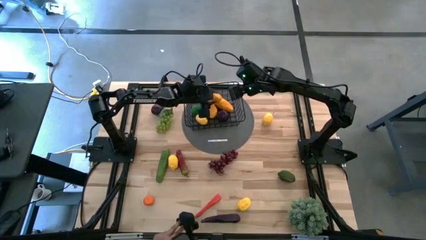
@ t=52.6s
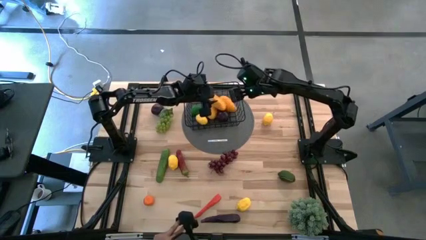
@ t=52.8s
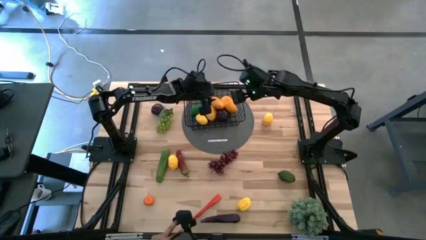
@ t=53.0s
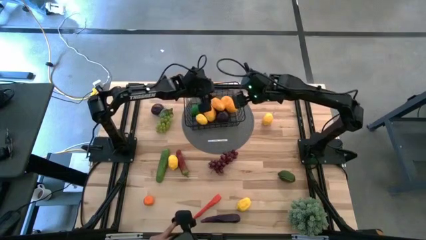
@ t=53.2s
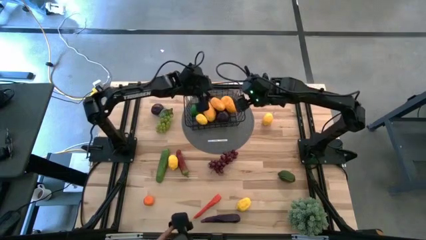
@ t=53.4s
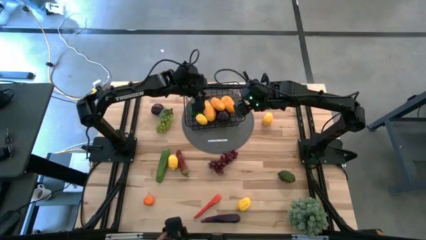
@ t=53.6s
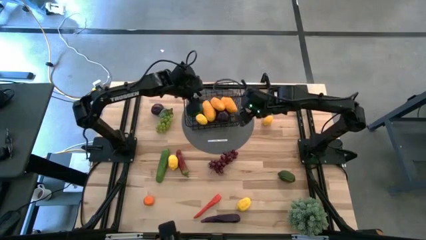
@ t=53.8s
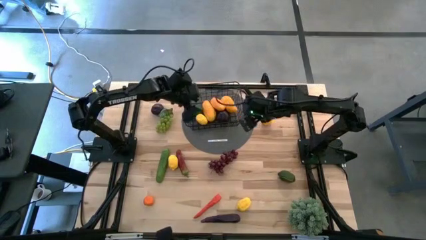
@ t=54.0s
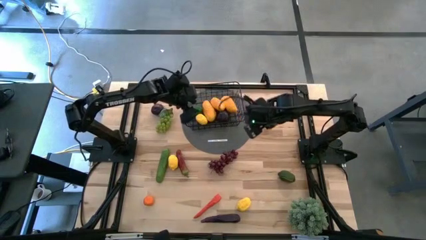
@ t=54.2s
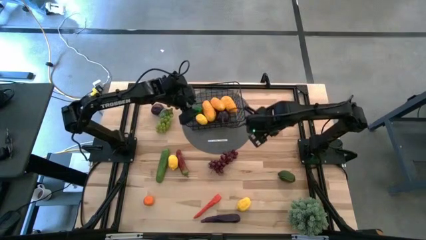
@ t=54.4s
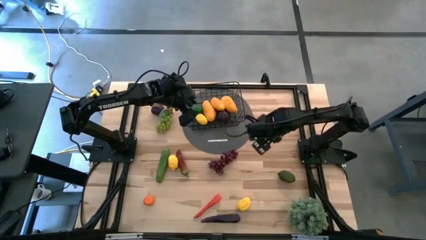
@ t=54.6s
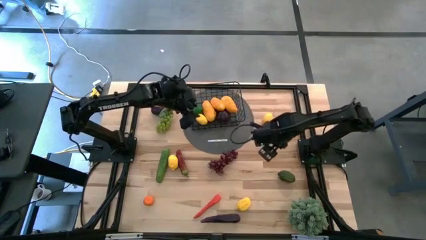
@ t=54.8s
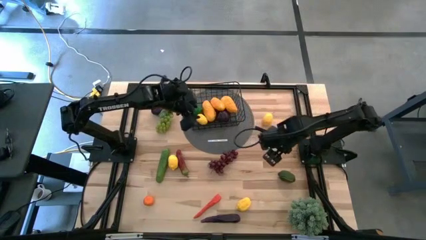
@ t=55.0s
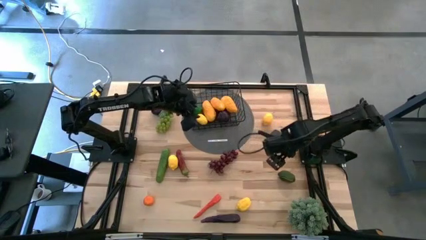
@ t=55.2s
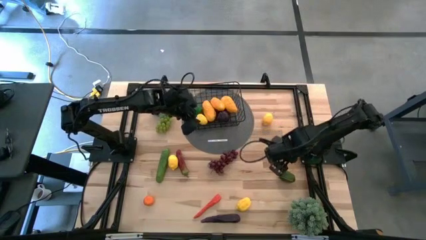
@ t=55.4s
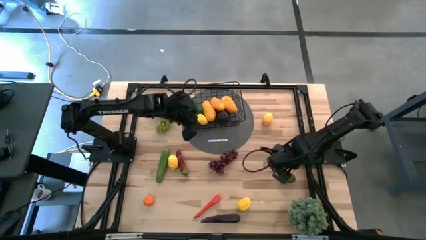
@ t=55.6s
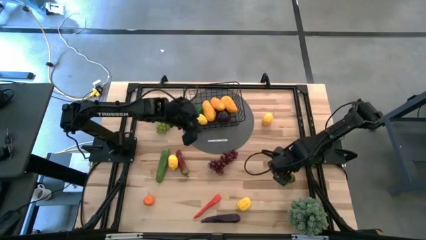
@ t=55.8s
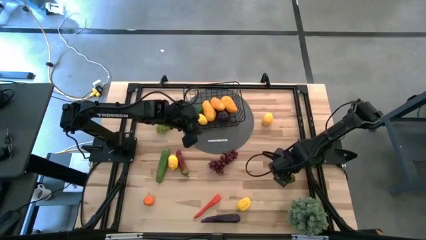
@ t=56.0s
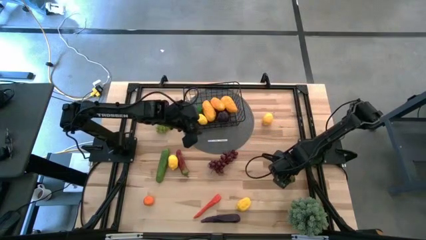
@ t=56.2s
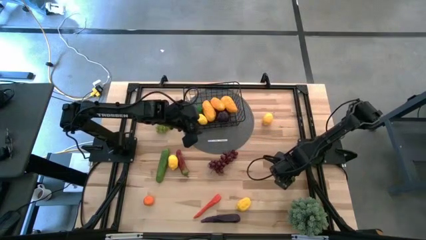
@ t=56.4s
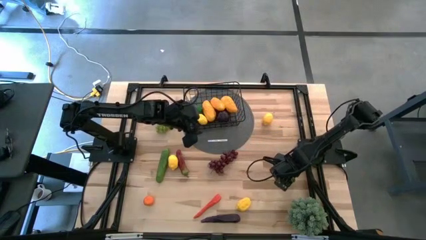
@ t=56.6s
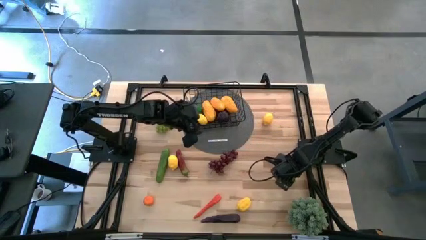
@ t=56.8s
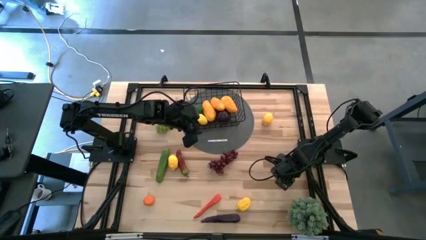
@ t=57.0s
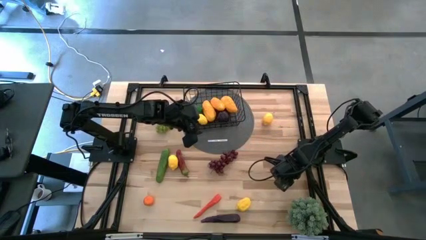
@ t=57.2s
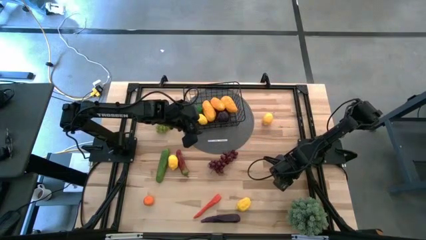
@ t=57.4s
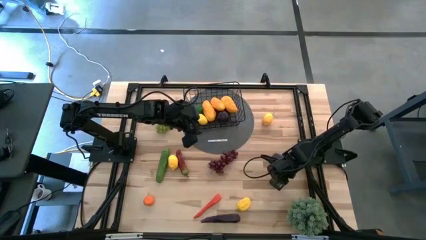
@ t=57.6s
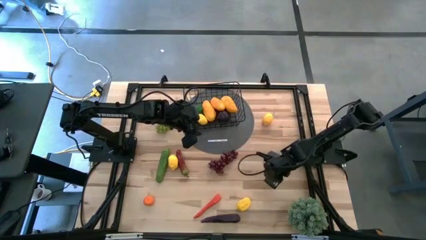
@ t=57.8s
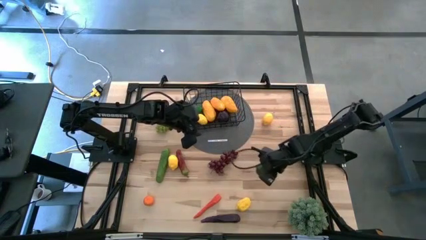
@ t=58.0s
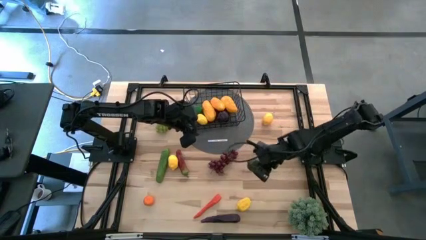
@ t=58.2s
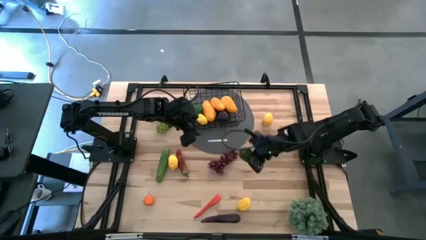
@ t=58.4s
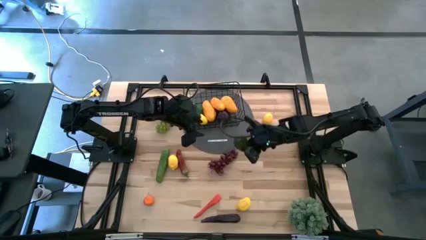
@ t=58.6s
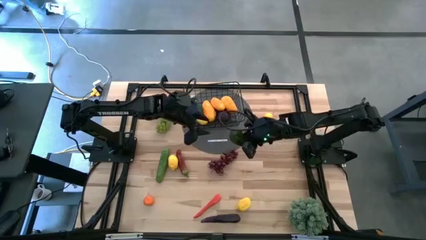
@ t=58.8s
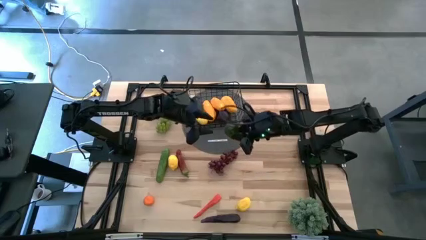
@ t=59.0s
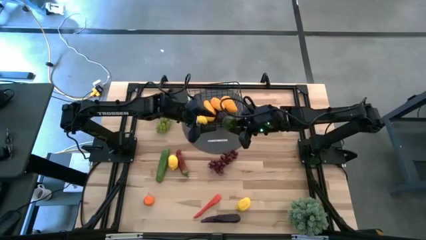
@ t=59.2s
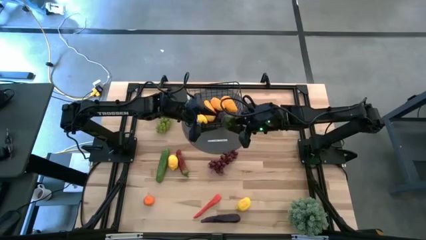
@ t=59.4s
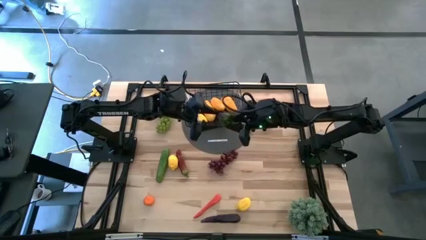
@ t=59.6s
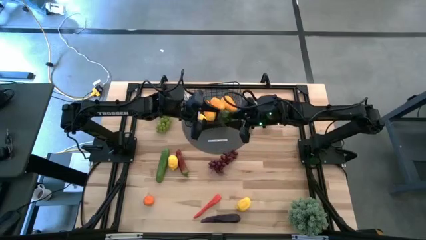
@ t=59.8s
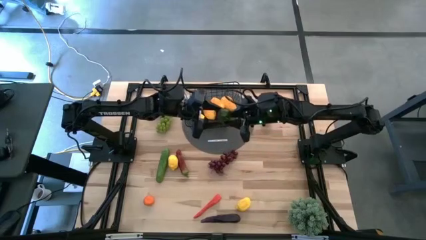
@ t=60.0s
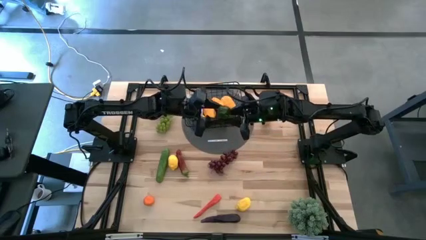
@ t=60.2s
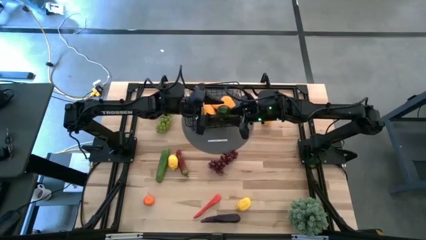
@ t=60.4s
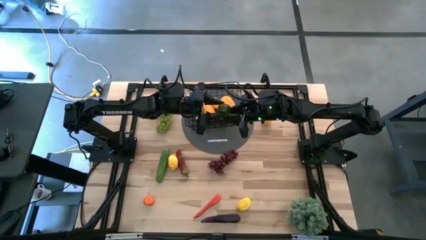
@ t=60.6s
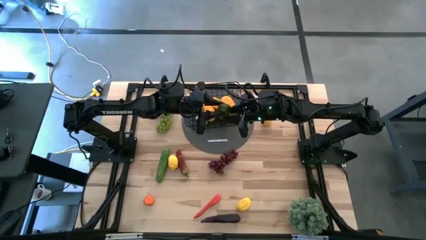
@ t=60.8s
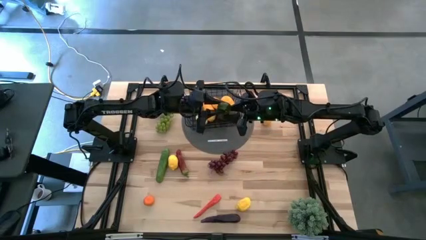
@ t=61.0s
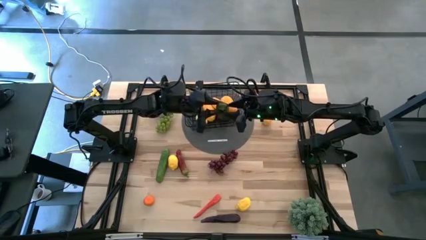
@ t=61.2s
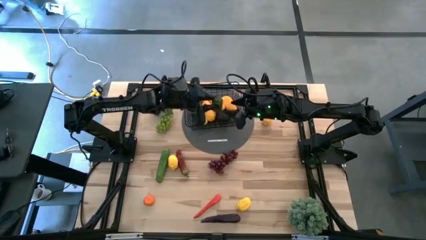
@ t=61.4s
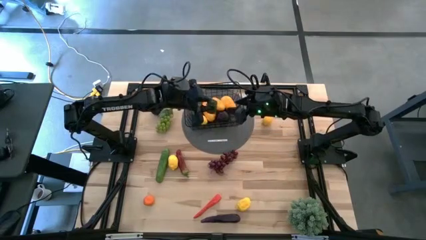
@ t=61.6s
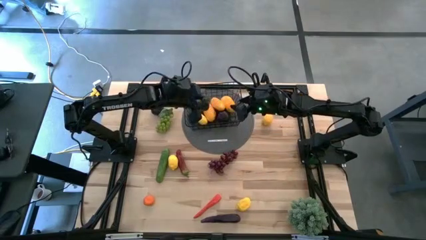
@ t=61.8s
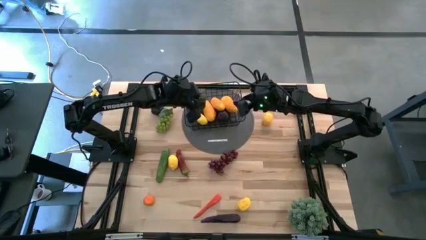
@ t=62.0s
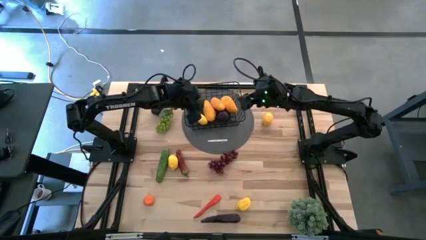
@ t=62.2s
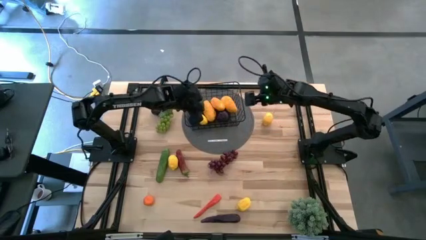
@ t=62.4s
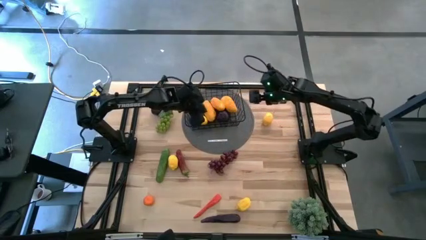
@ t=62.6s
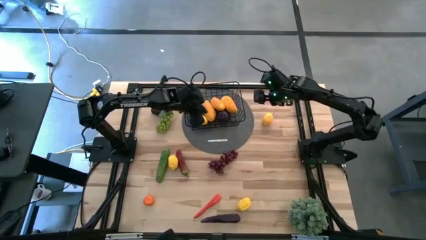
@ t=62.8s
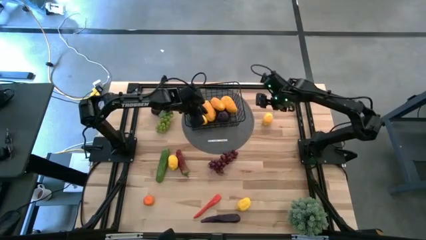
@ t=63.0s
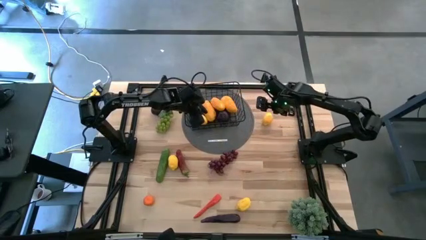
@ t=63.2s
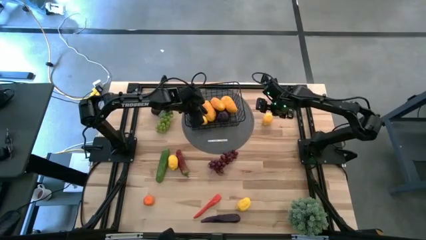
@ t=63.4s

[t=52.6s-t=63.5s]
Task: Build produce basket
Put the lime into the wire basket

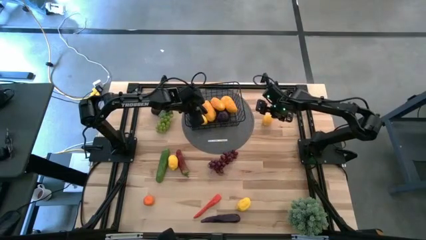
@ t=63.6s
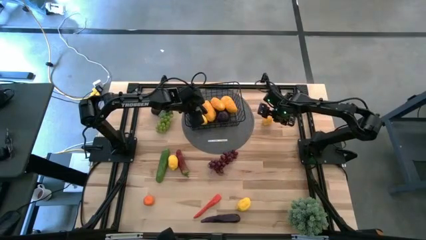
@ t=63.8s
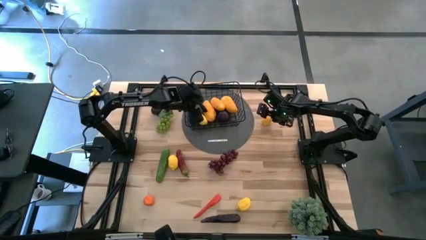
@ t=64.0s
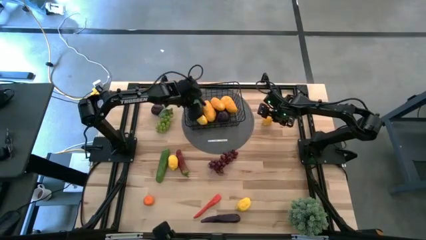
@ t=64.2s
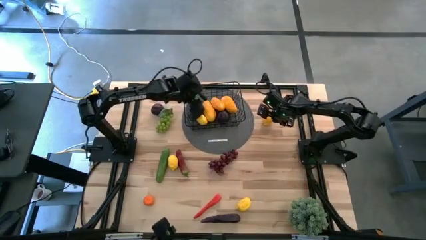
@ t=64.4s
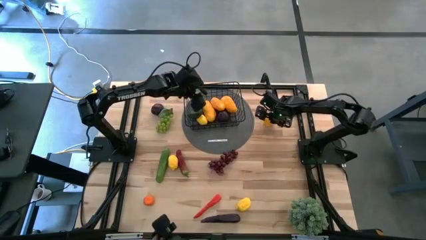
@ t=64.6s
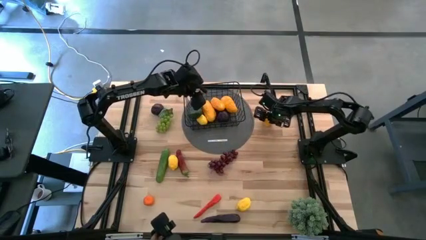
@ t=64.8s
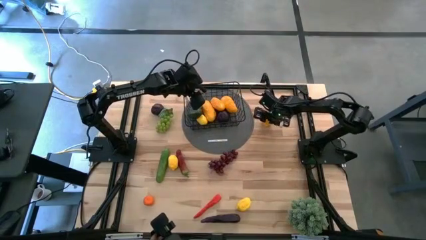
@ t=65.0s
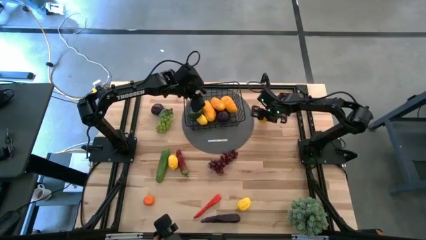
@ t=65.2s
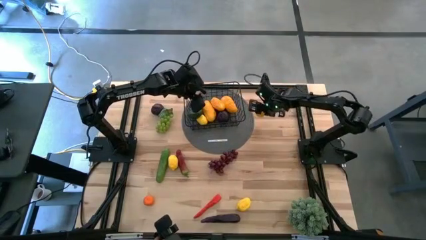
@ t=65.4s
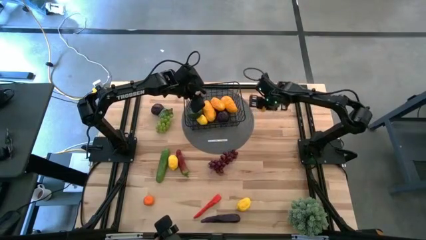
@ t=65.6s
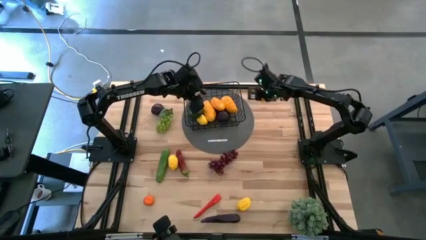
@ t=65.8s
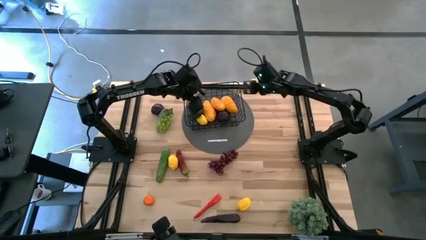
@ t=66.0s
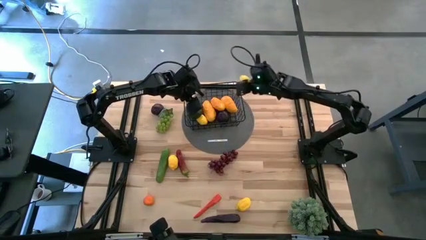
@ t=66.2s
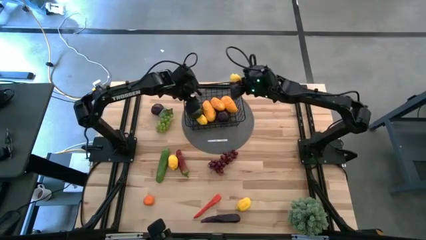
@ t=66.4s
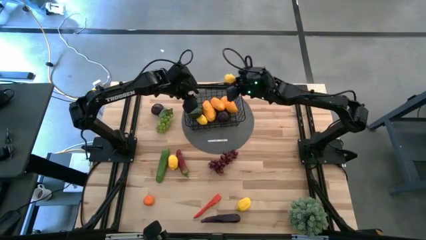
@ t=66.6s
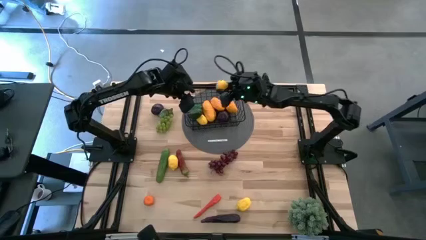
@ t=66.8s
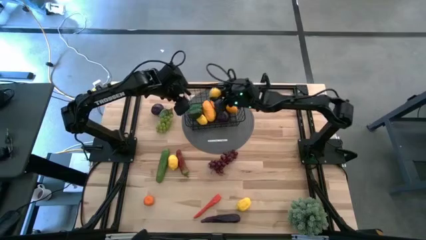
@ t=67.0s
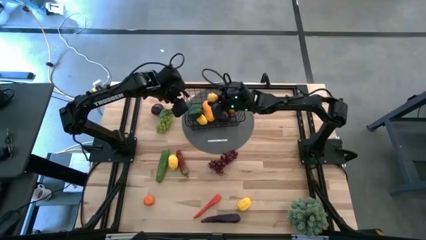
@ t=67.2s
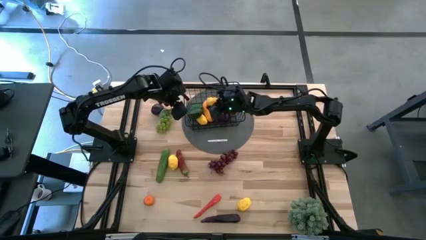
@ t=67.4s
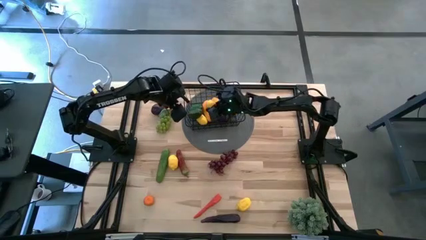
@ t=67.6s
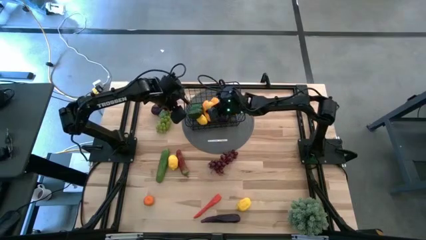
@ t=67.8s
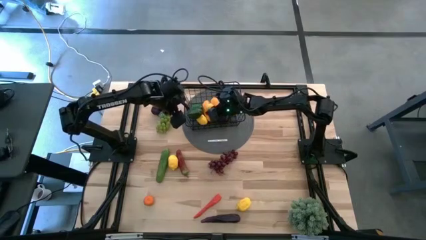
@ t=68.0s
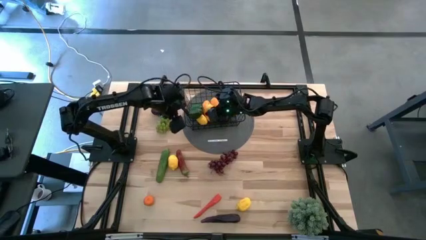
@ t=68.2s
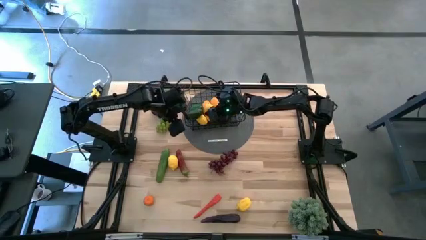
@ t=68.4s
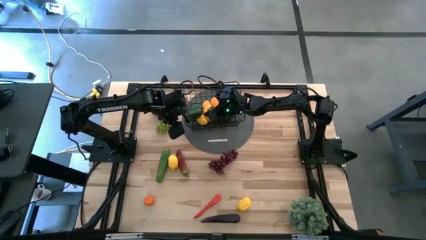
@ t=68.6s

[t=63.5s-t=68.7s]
Put the top lemon into the wire basket
